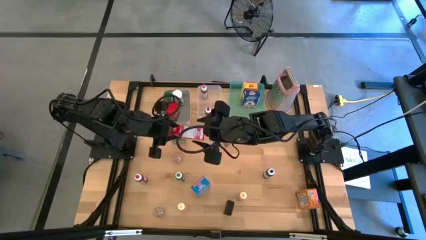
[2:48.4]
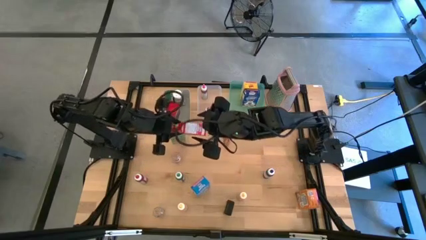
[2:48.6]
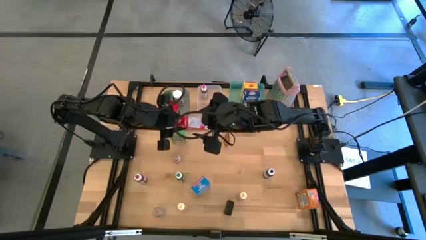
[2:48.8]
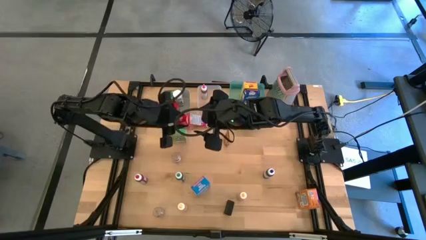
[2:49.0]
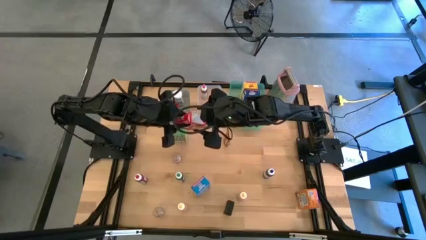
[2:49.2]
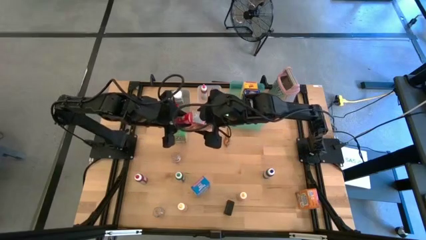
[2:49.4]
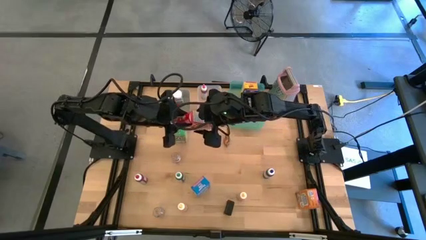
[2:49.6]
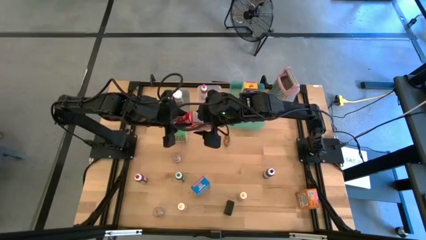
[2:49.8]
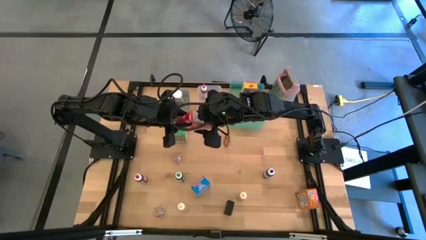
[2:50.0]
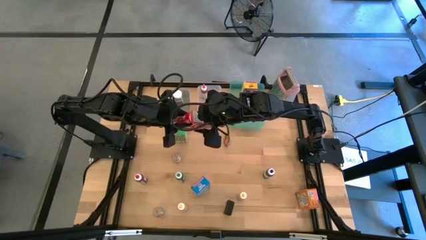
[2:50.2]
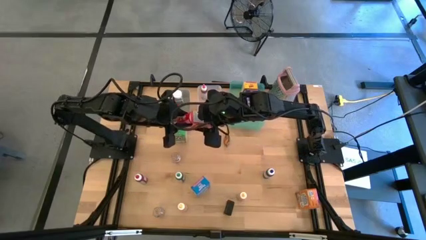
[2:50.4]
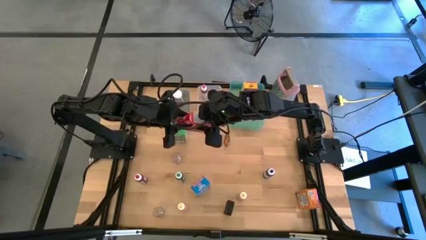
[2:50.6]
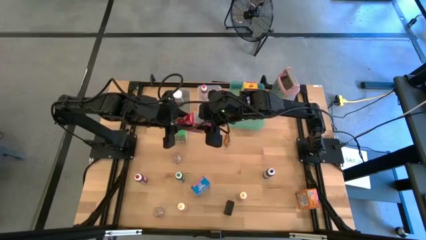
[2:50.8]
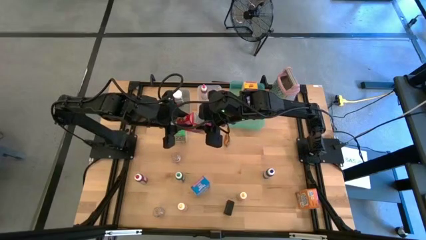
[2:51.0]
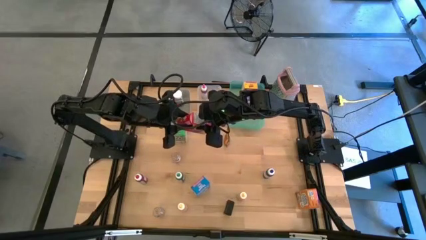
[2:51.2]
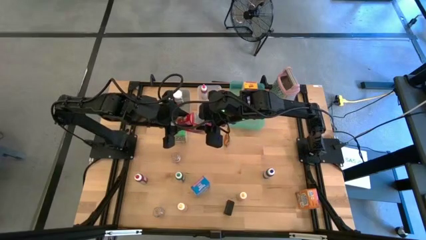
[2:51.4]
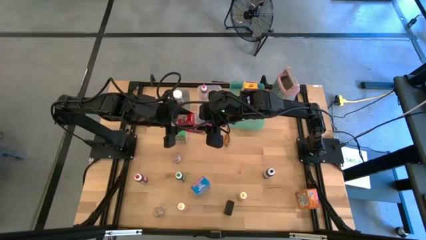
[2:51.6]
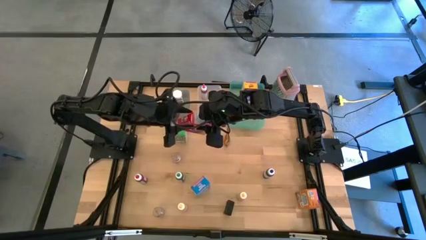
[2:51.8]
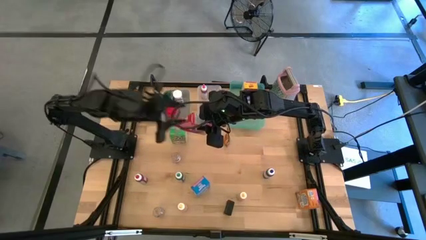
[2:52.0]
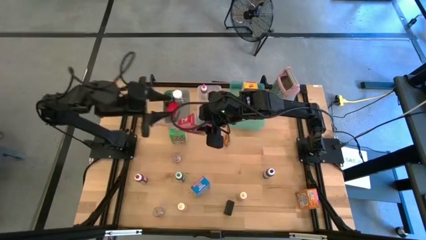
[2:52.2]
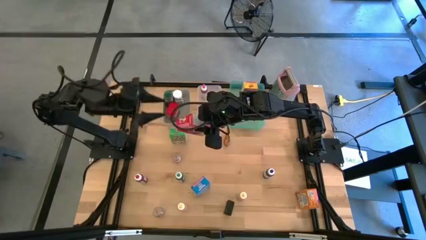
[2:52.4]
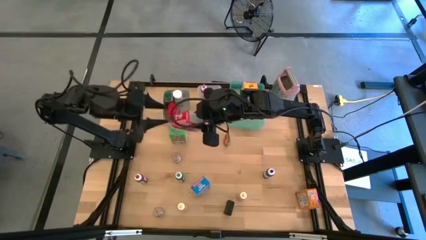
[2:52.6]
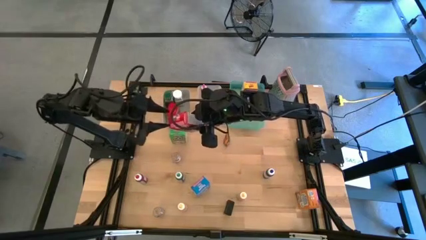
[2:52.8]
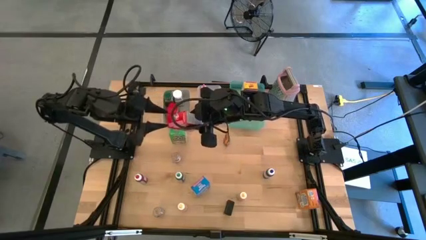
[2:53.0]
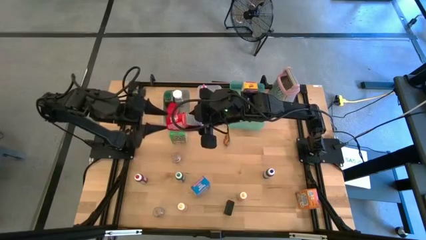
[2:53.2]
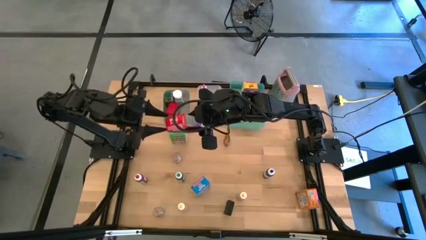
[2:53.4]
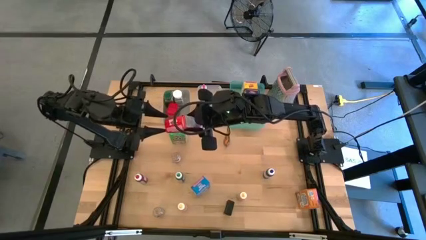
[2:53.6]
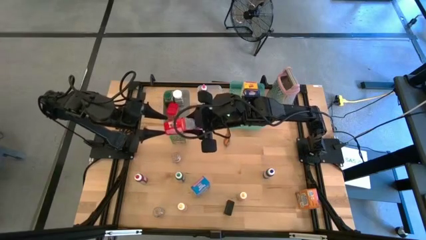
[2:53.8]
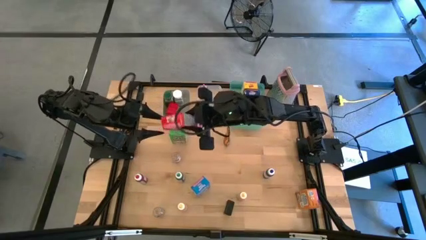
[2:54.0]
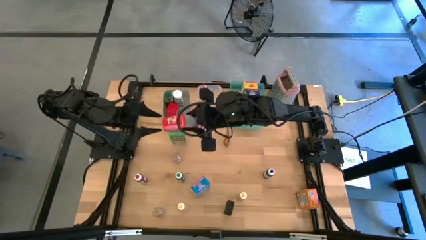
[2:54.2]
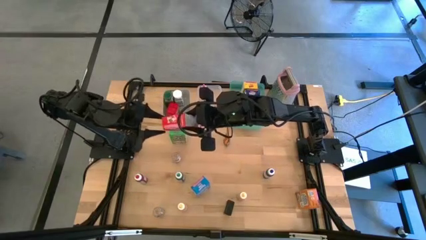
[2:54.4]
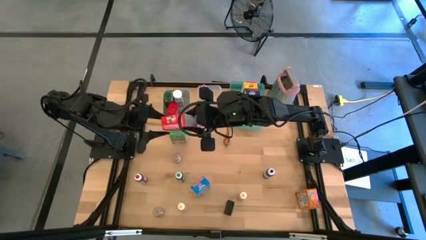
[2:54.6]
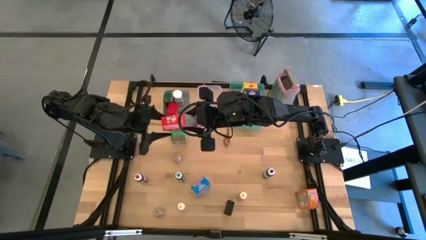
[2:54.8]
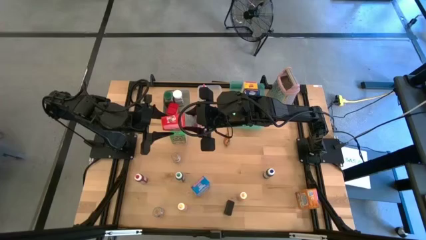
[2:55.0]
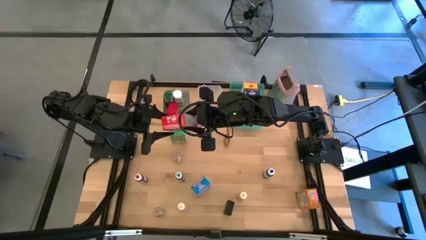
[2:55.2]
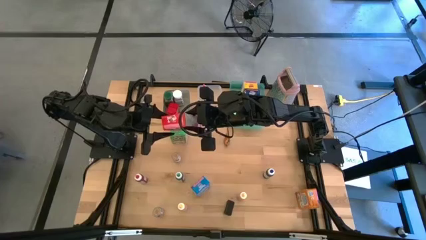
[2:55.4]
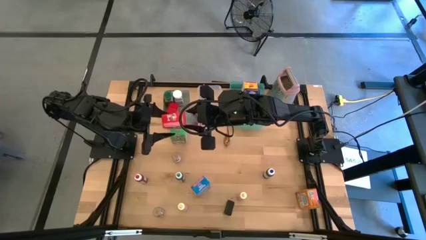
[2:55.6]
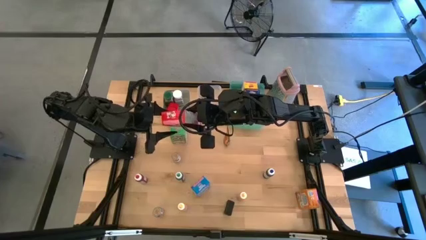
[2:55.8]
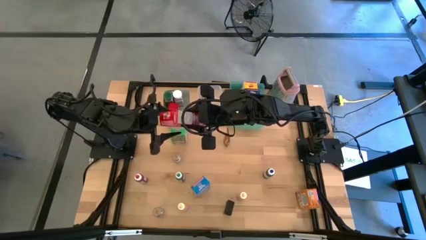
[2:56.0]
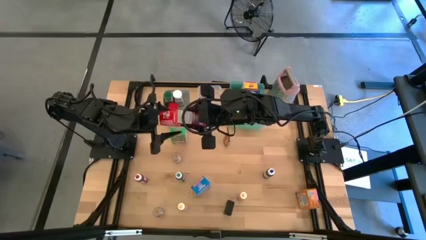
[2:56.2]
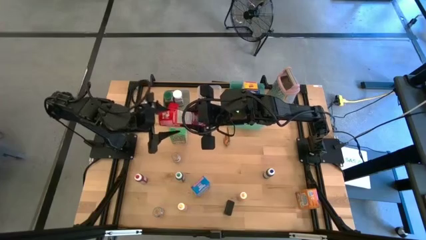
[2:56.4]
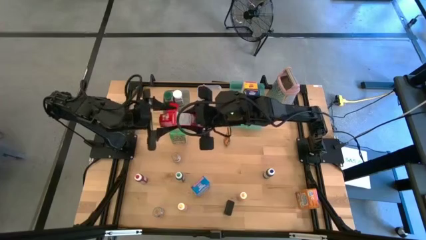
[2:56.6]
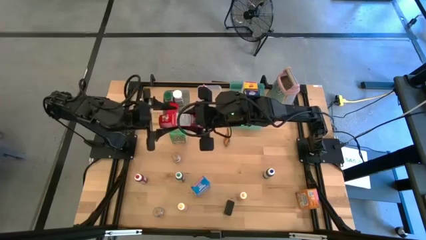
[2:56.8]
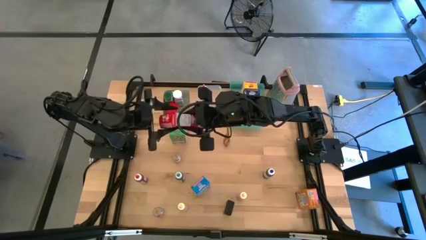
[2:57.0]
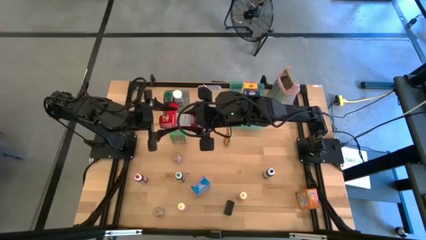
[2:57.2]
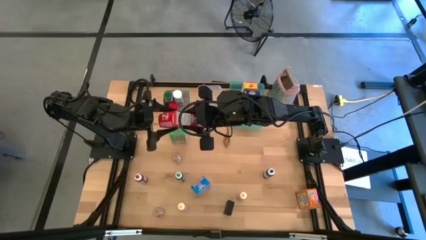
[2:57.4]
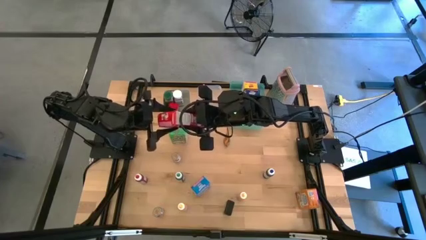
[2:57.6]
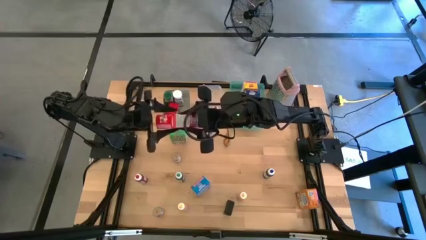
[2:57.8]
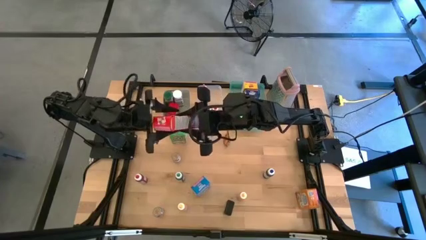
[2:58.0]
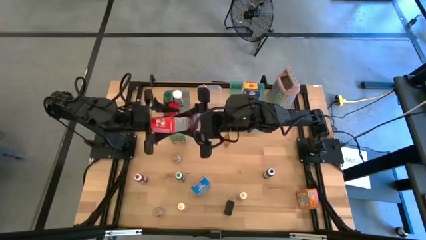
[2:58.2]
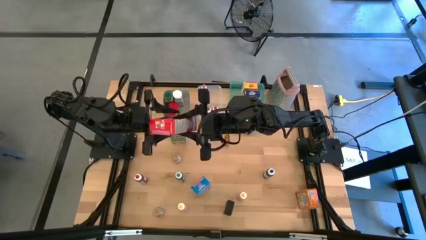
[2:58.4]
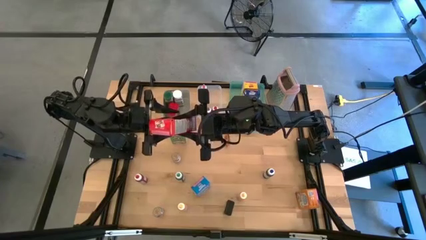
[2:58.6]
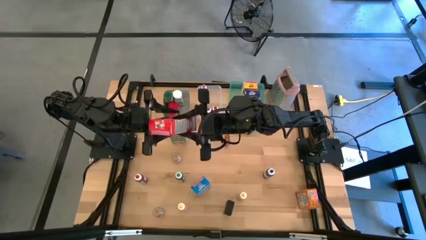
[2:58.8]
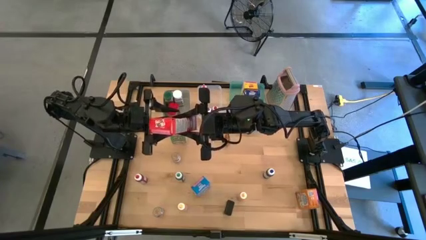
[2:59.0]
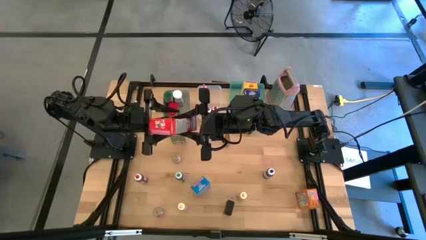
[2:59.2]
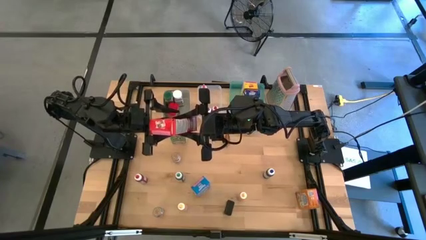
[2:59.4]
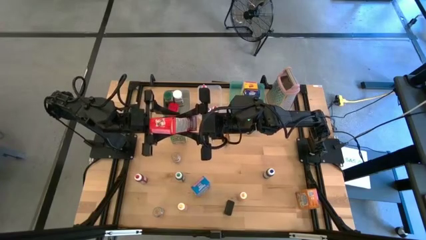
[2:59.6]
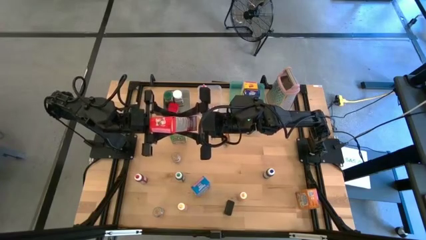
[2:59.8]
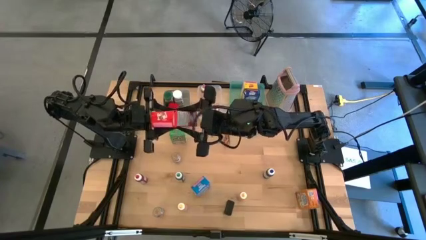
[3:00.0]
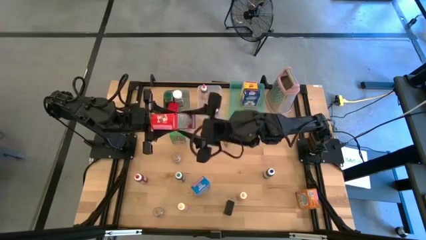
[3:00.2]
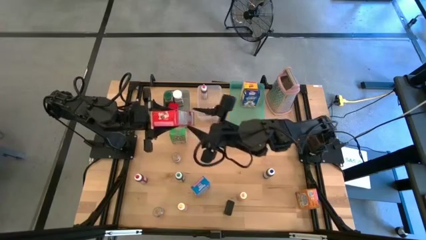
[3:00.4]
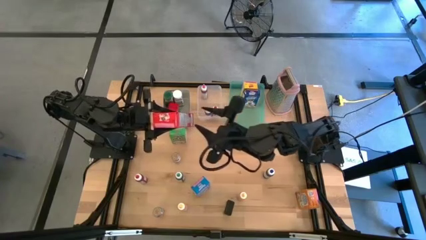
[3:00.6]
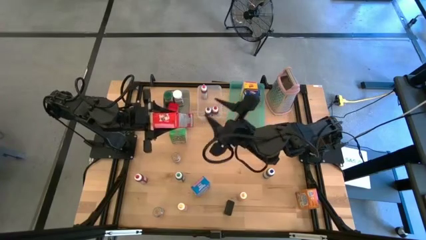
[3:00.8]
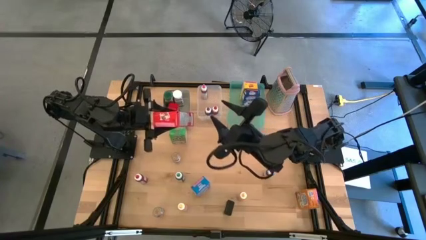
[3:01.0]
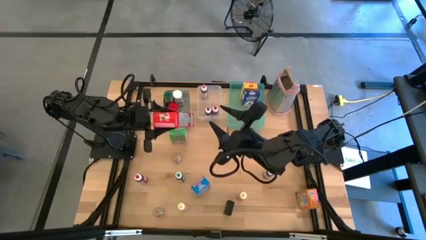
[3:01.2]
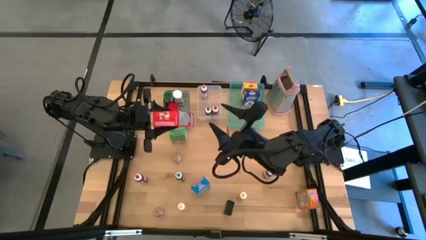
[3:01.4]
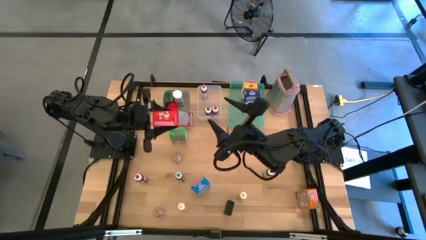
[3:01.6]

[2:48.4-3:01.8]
Task: Pick & Place Kitchen Items
Put the red cereal box into the green bin

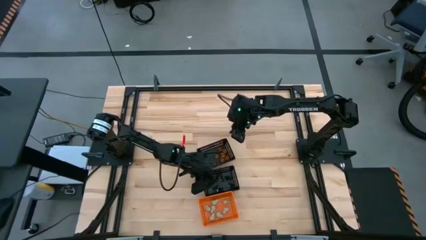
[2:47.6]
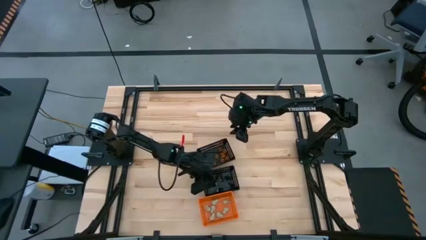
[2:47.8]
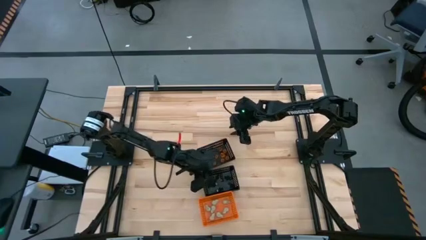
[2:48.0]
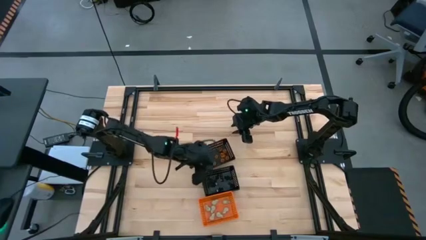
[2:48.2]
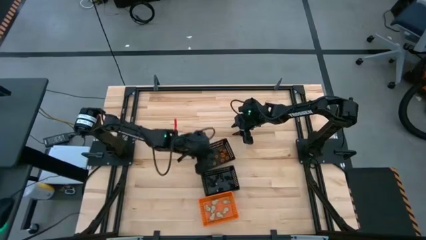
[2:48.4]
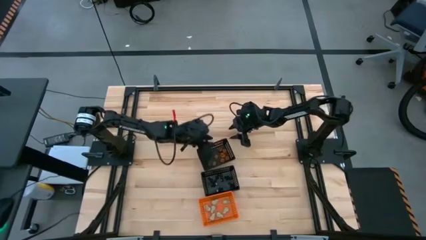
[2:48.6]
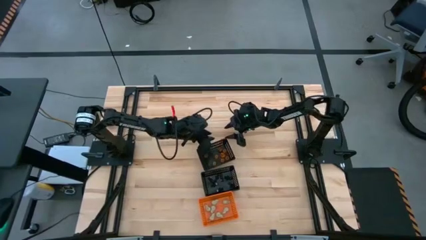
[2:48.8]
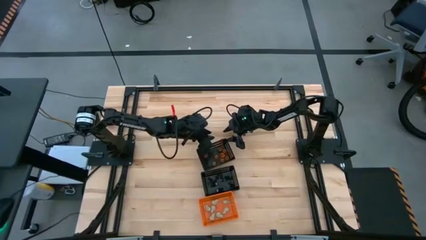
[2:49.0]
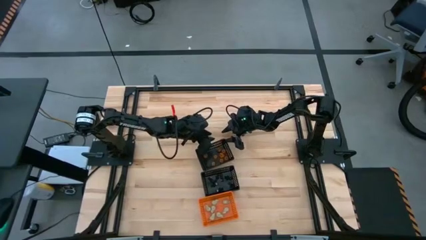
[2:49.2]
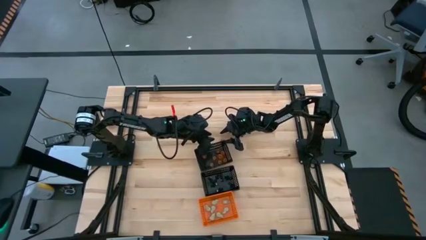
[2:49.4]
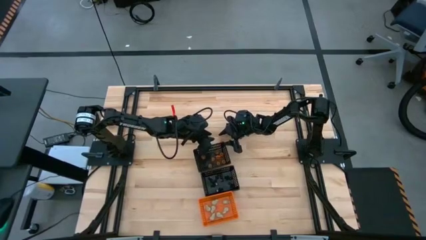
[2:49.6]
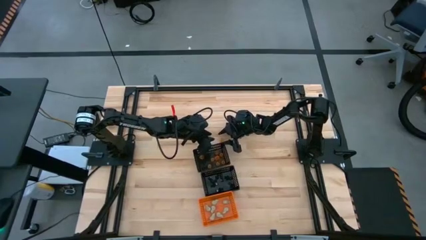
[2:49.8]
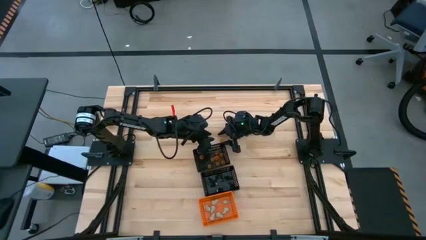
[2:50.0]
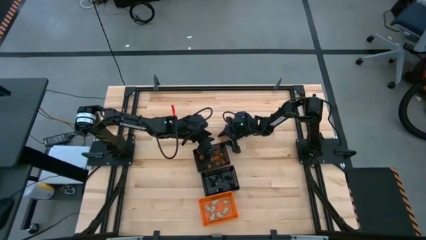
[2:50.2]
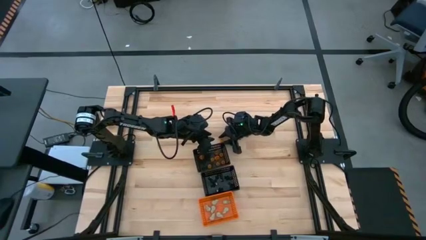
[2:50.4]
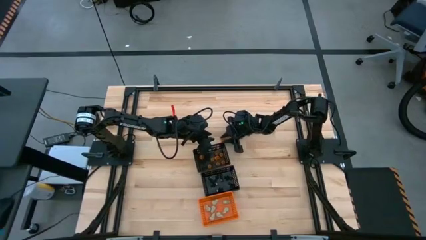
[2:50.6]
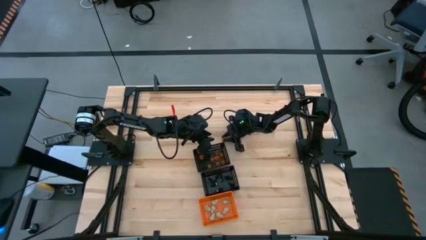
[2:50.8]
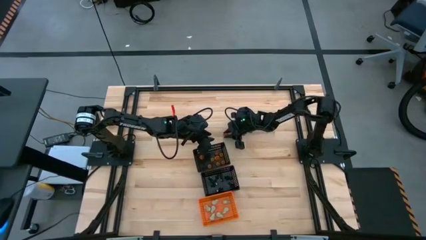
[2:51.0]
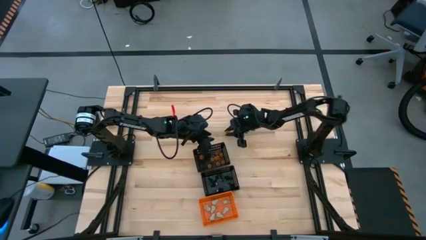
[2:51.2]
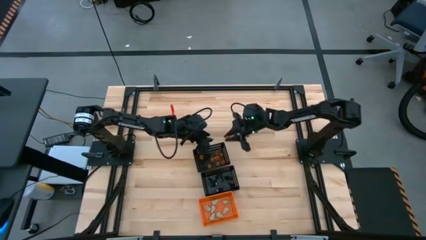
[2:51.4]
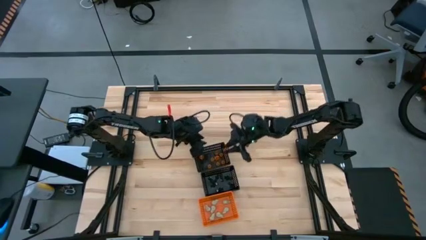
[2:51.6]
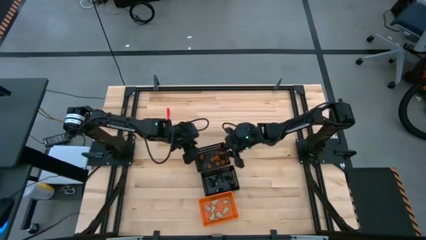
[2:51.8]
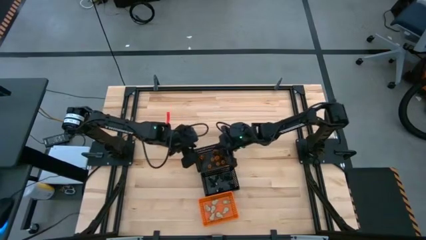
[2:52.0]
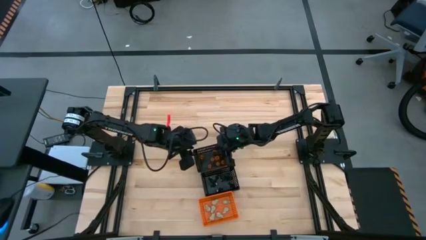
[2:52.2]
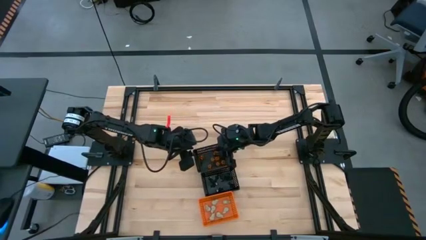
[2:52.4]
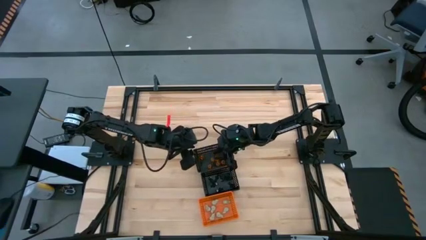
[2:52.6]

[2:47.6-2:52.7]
Task: Sort Halloween decoration
Put the orange pumpkin toy into the top black bin
